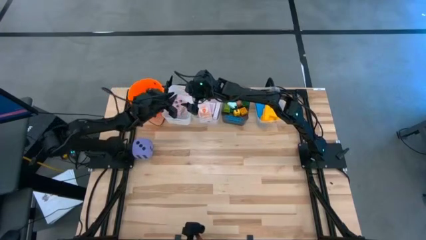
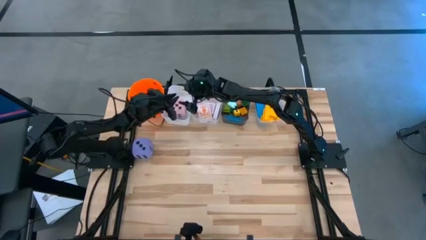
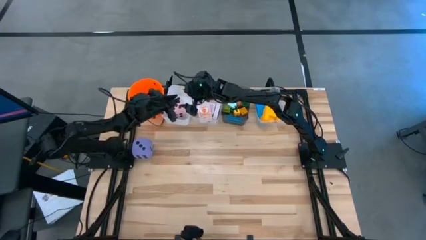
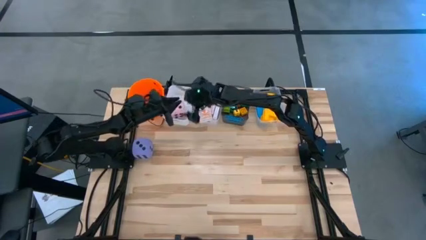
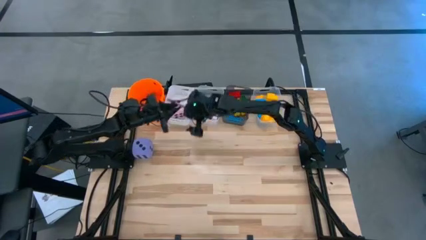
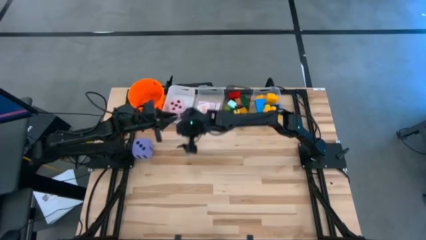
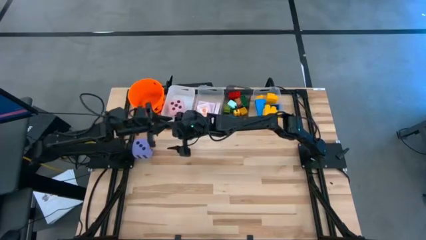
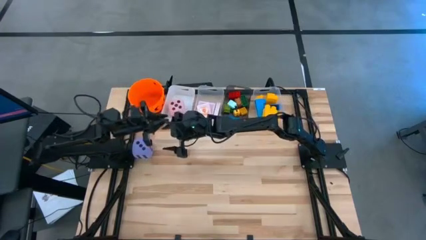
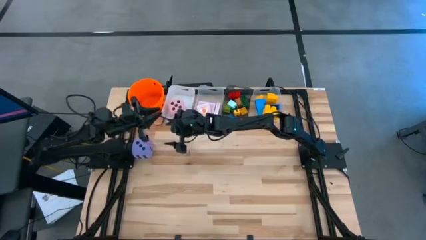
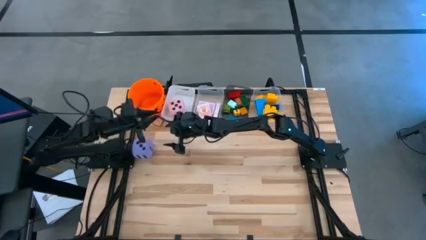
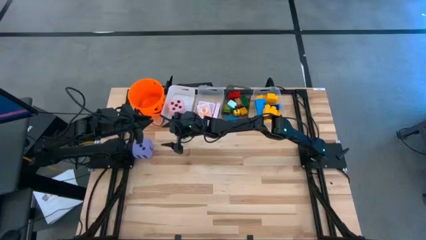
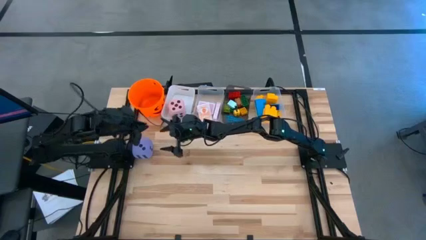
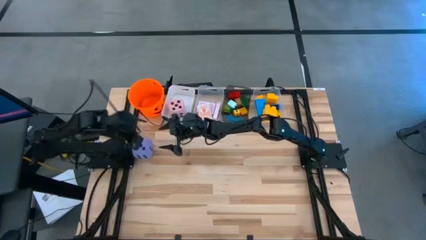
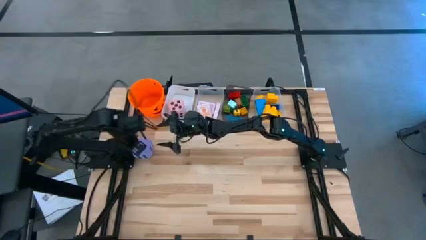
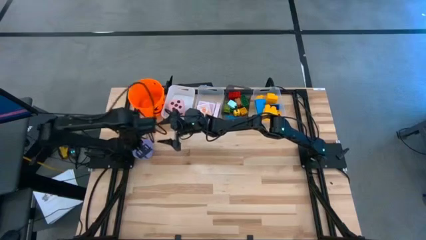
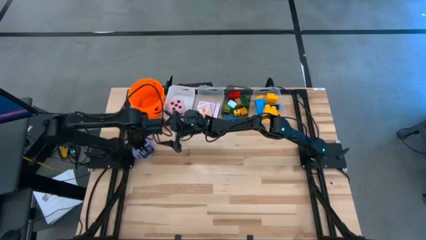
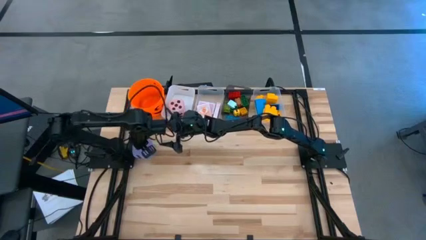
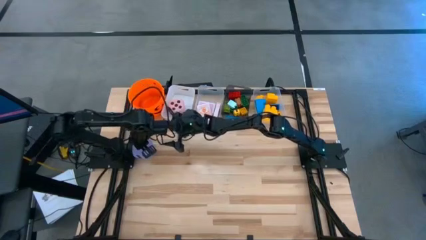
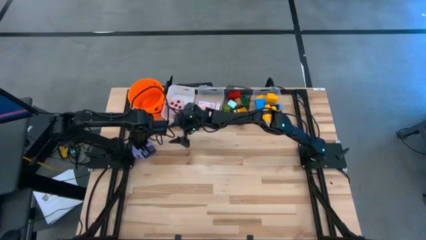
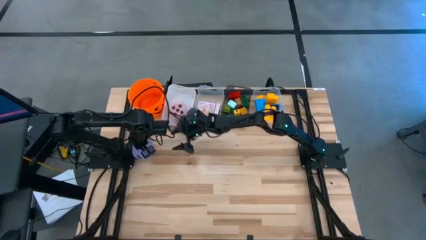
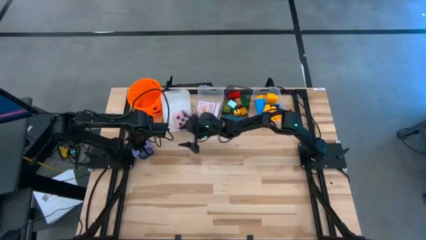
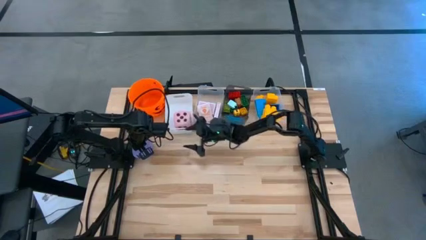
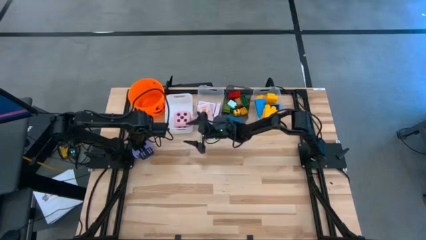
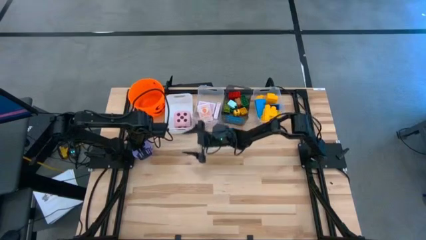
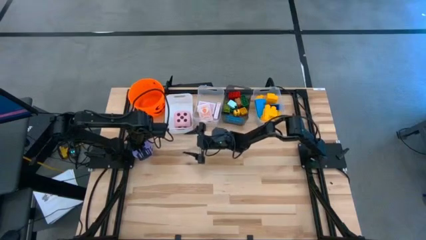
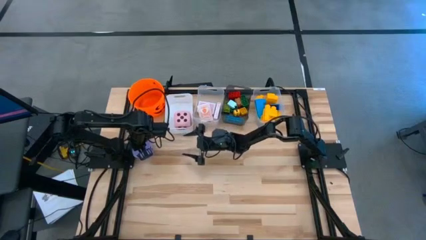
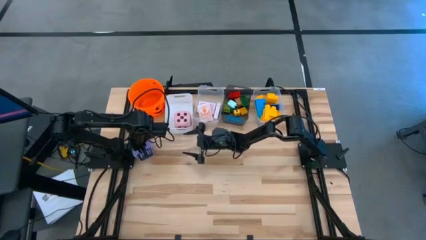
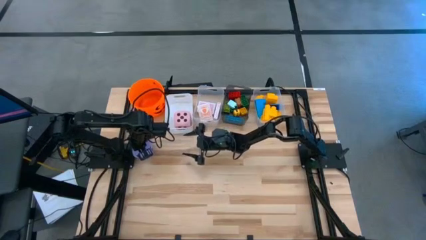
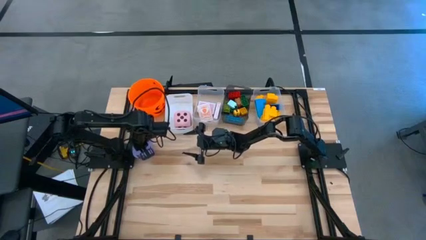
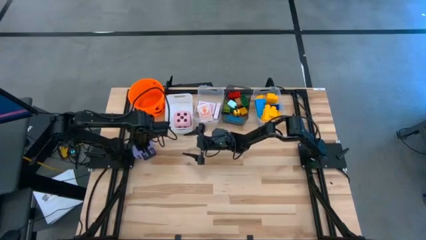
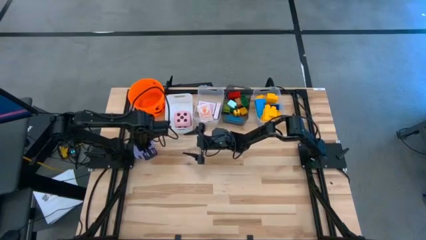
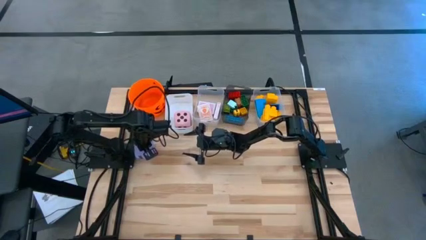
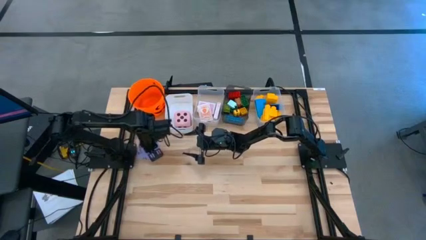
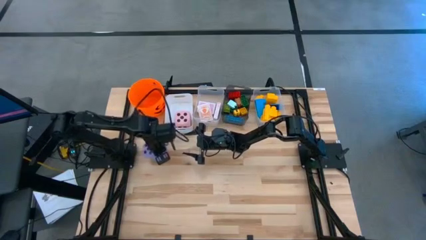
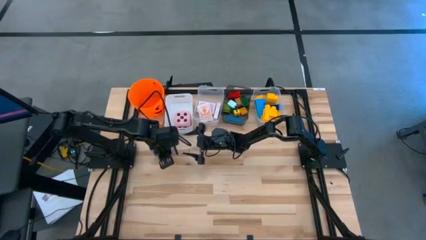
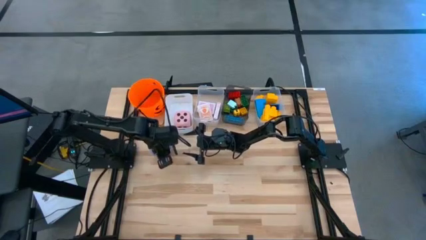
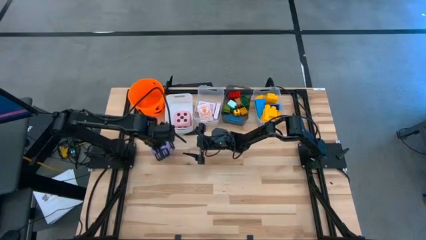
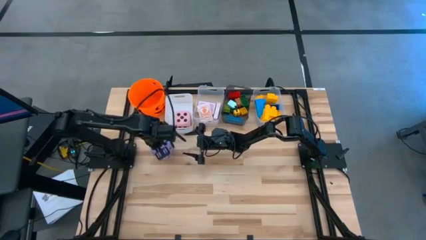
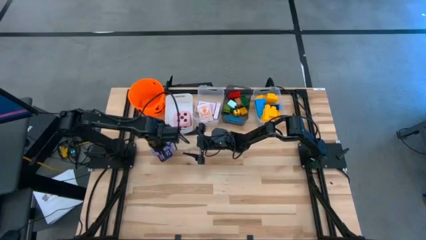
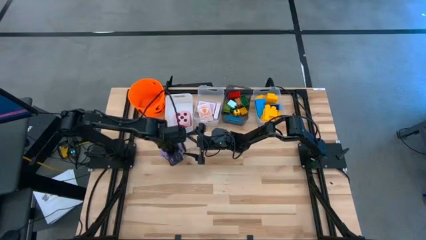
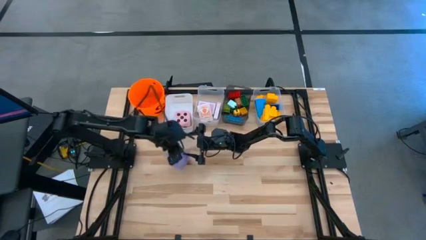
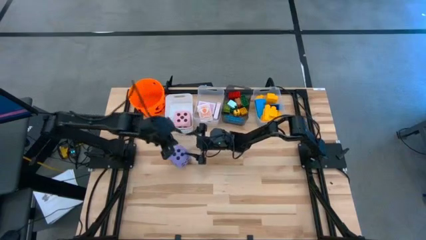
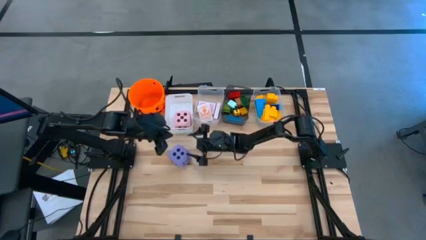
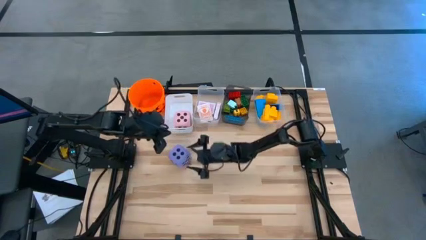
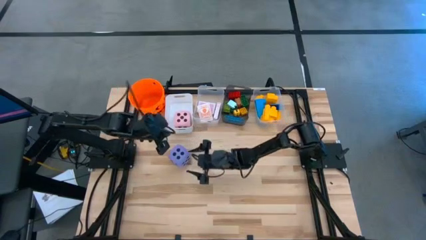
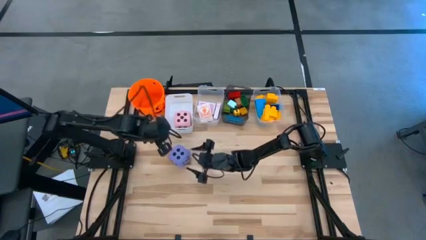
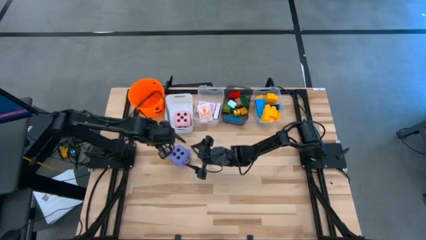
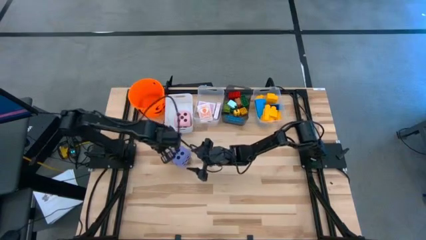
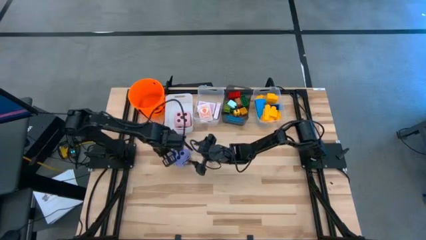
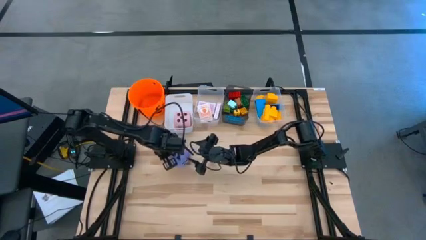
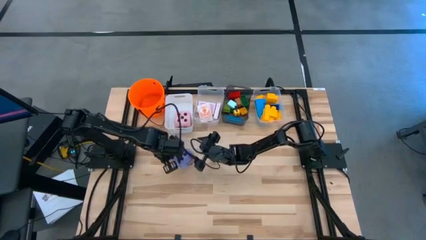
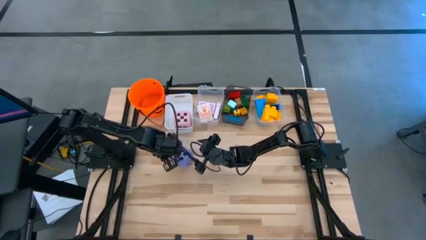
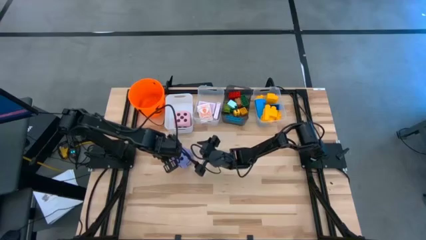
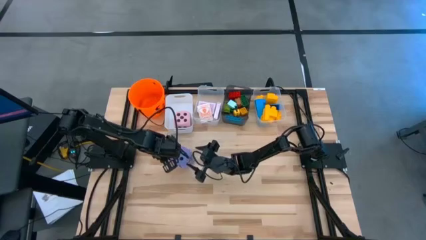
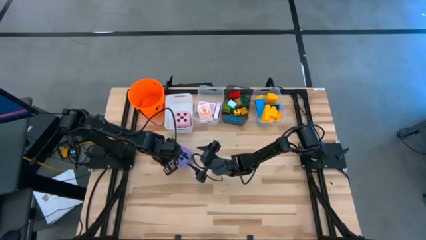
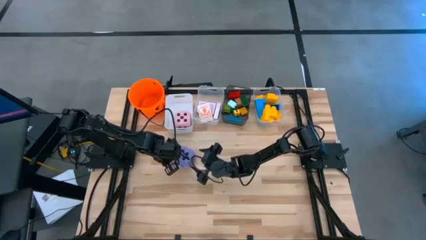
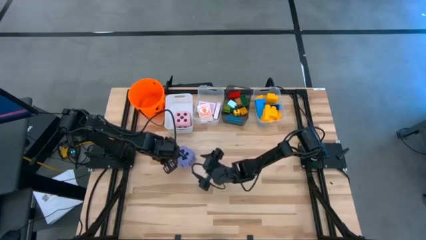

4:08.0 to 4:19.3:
Task: Pick & Place Toys
Put the violet die into the white bin
